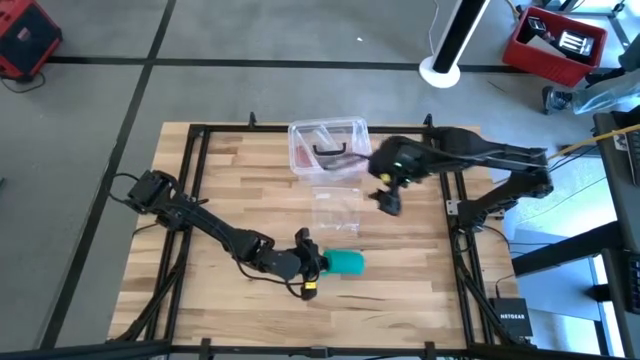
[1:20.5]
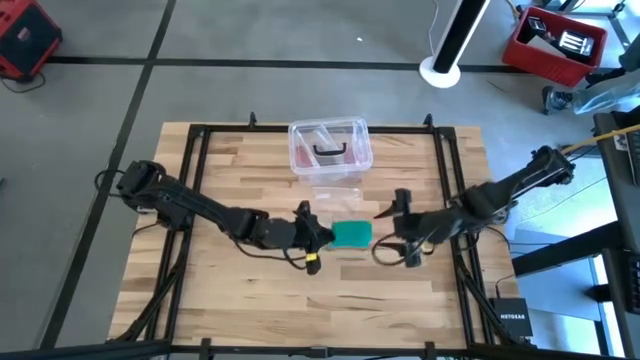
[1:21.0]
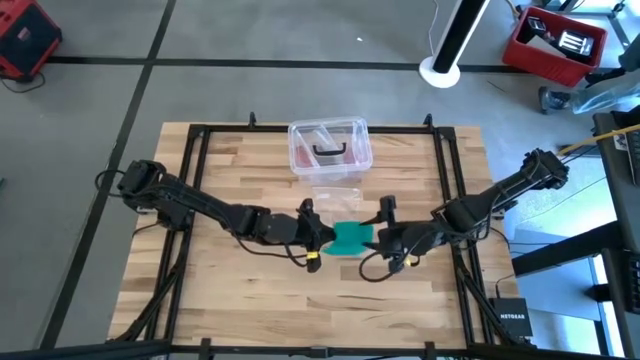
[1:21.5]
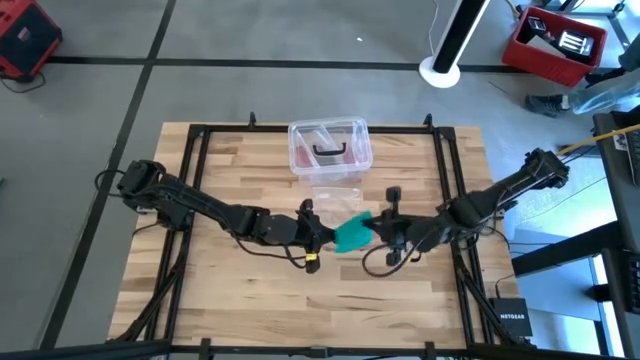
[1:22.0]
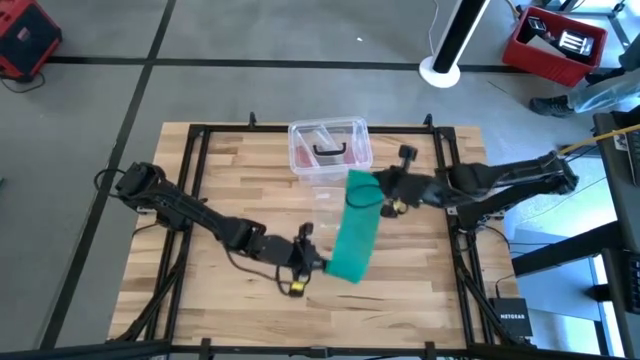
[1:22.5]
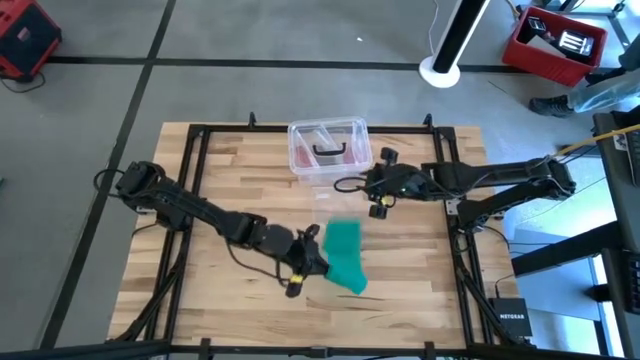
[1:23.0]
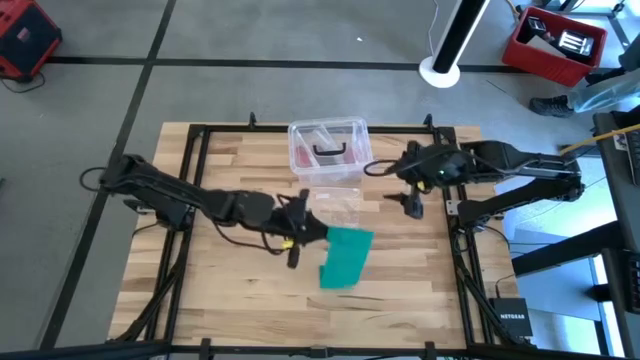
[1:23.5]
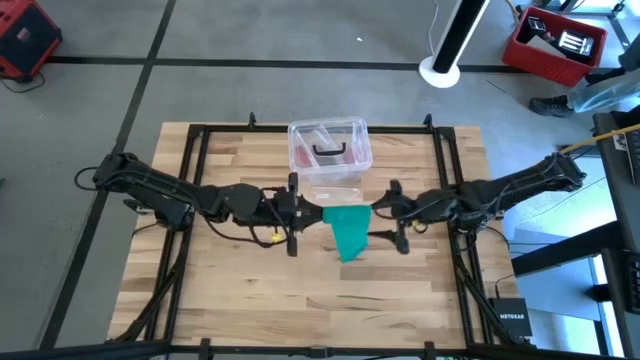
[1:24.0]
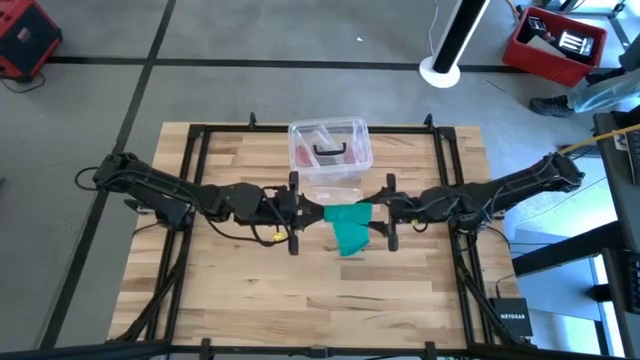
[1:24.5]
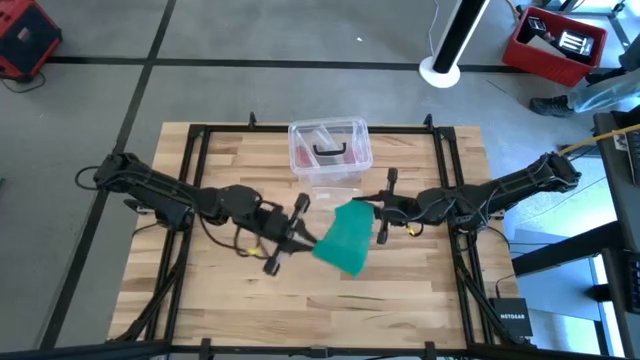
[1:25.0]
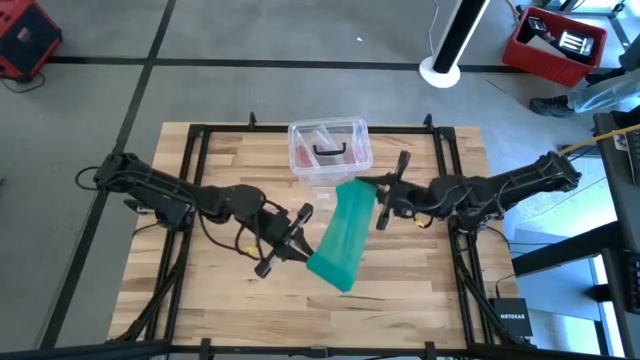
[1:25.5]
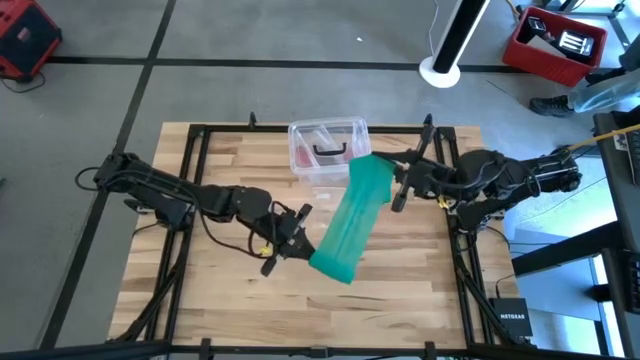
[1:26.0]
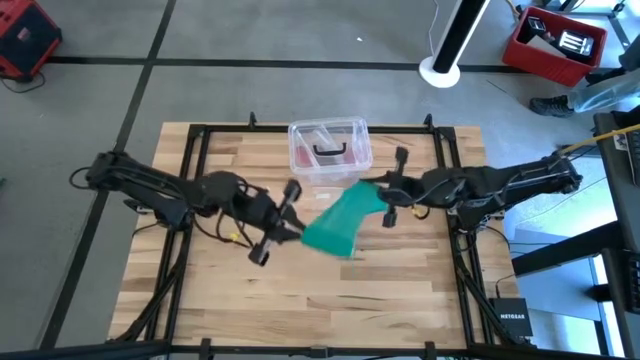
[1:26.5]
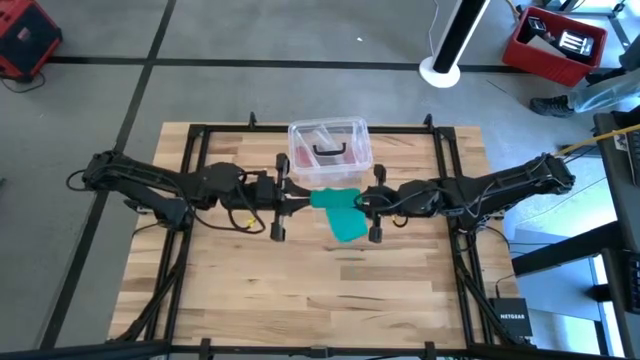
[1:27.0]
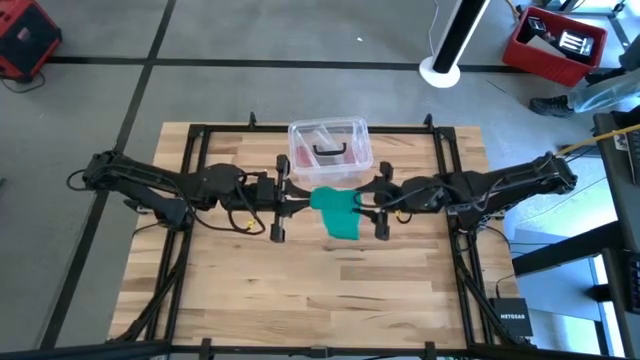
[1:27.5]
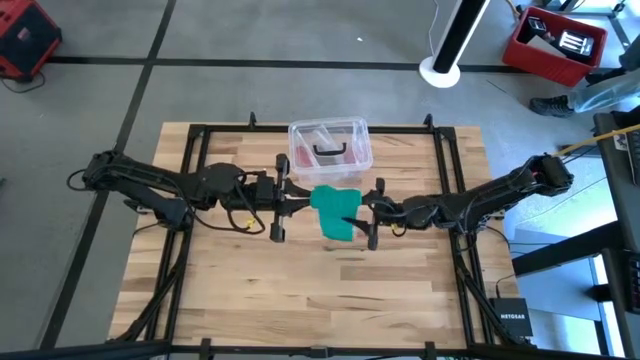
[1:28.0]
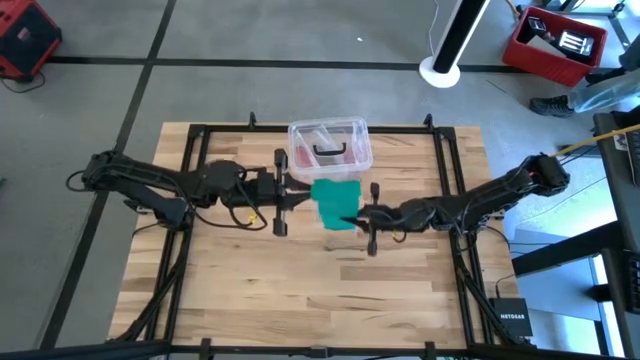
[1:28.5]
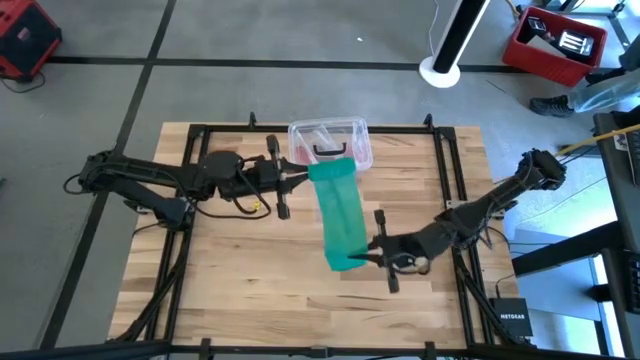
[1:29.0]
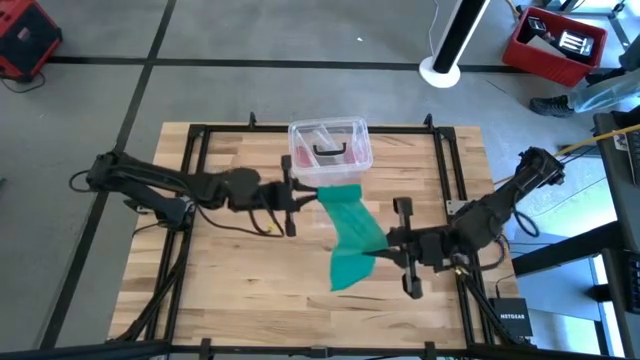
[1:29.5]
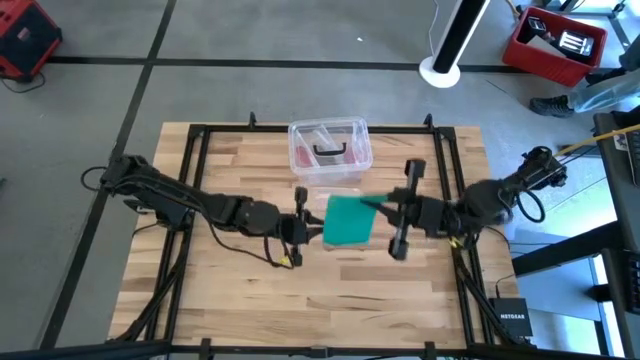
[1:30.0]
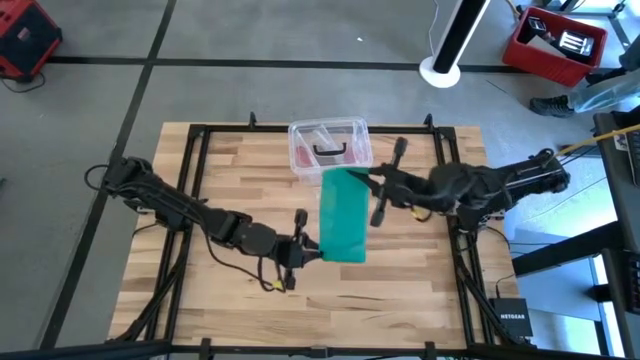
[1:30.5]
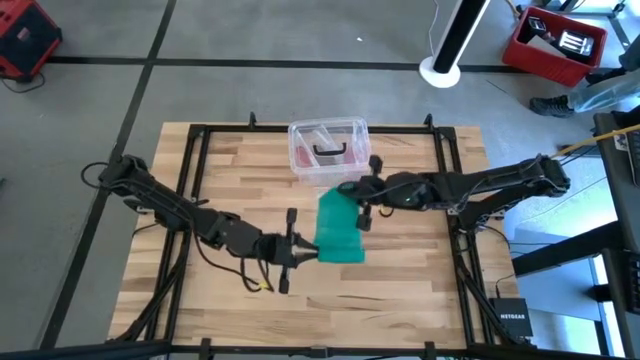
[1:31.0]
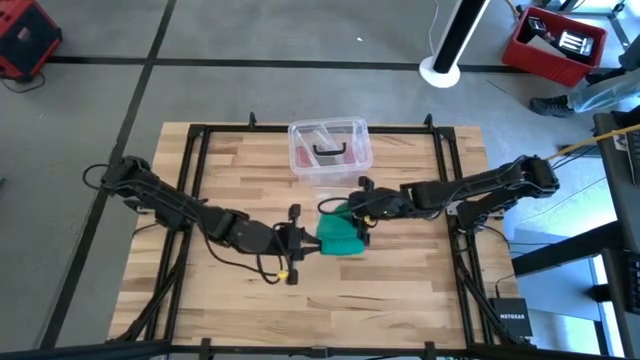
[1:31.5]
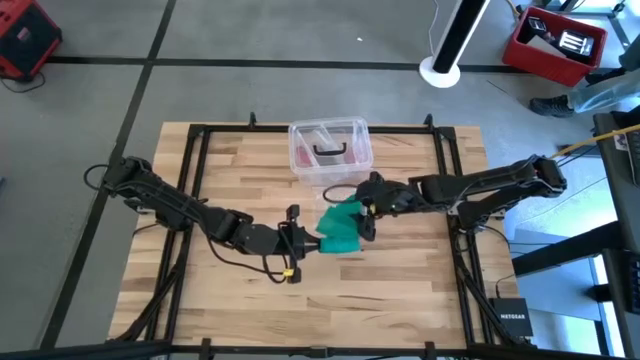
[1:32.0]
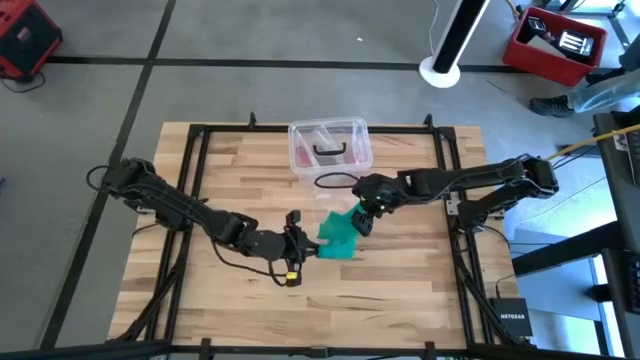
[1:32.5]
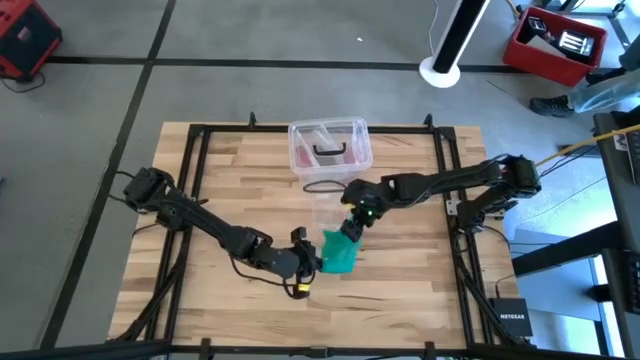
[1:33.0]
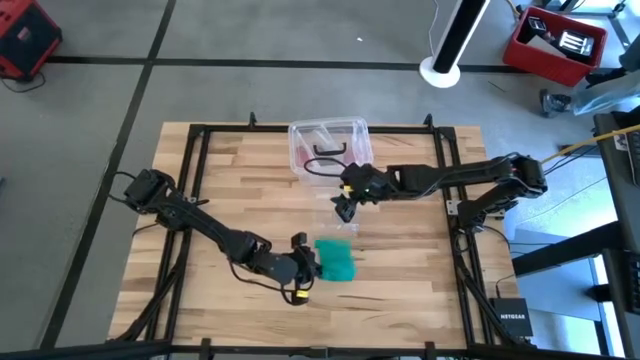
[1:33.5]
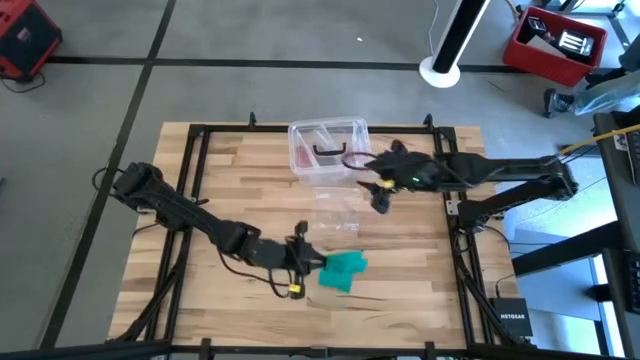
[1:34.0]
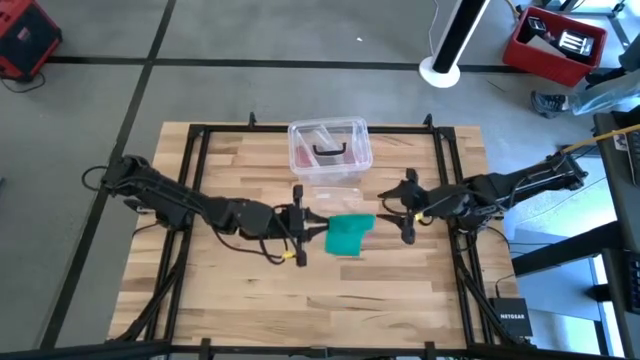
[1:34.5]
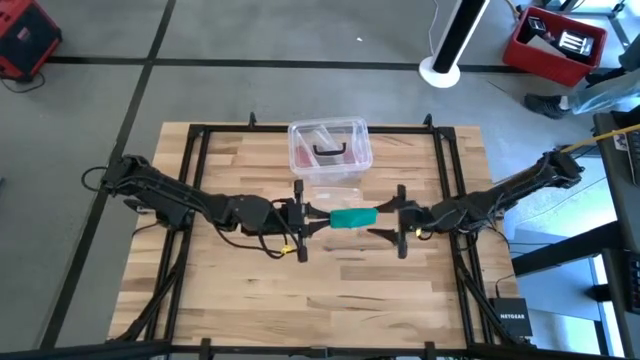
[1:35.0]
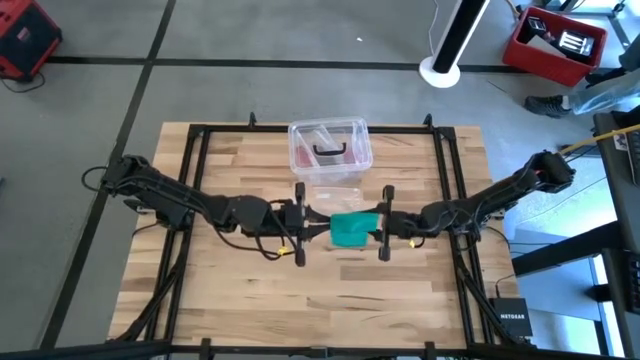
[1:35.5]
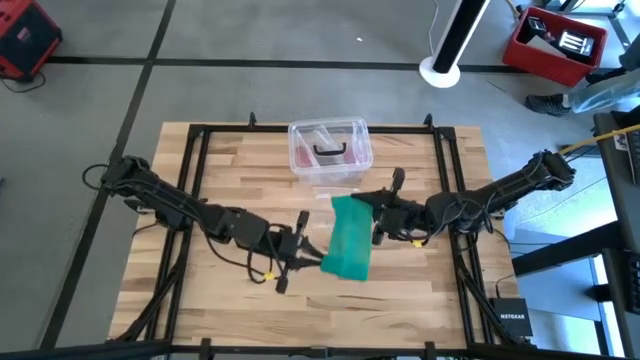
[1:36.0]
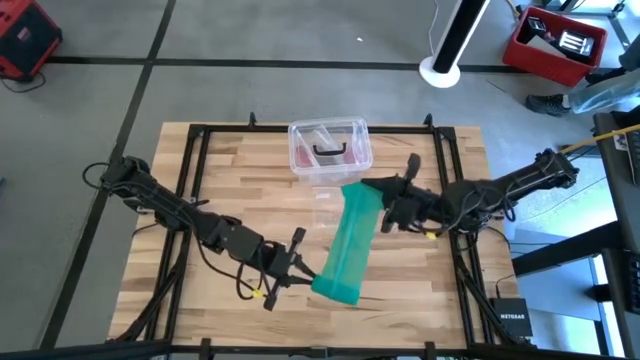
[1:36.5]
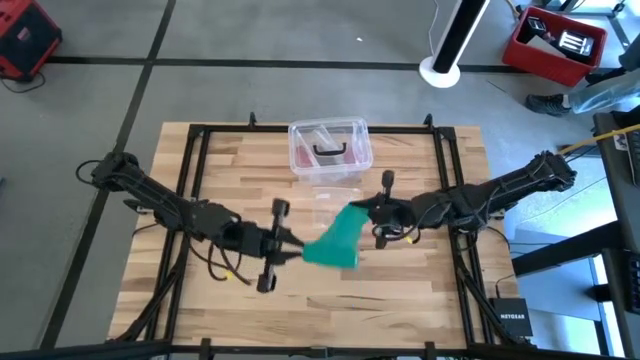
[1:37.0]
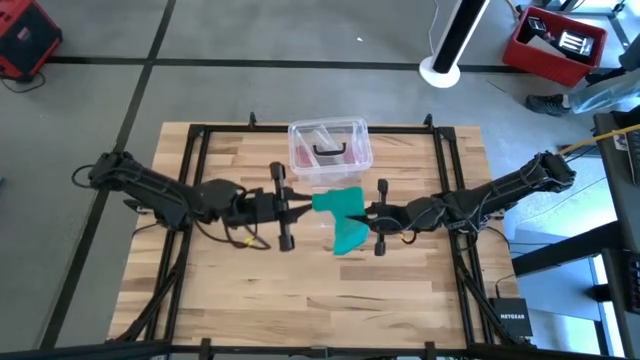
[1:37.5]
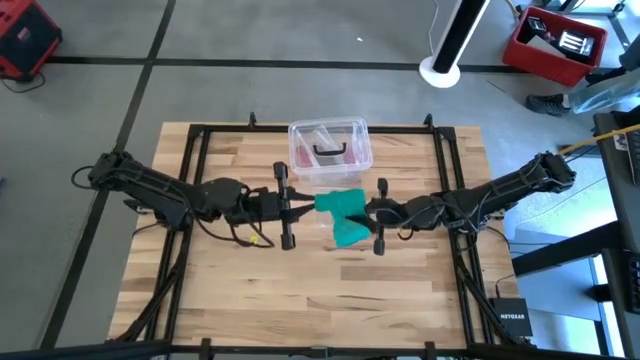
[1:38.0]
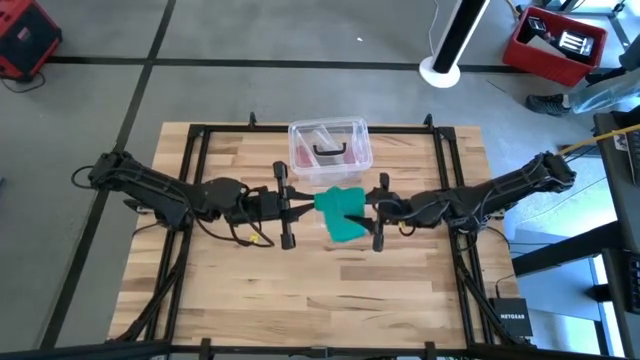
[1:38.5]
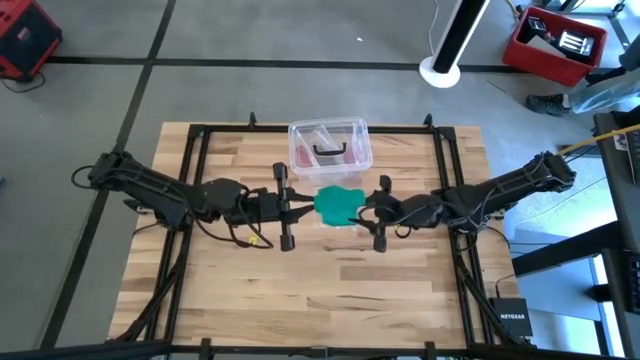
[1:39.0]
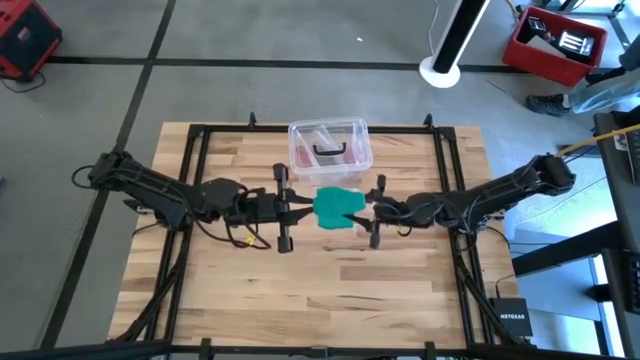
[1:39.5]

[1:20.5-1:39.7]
Task: Roll bandage
Roll the green bandage

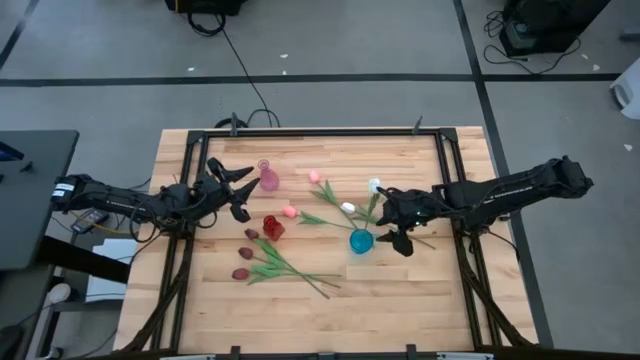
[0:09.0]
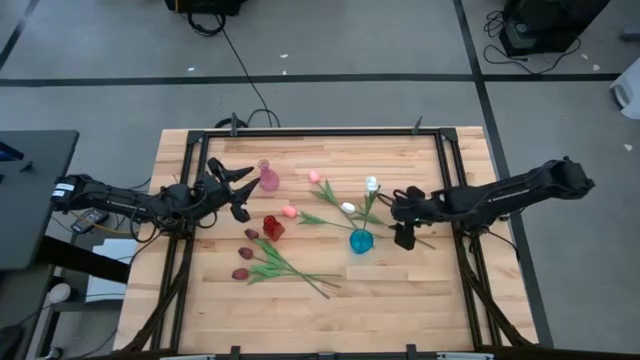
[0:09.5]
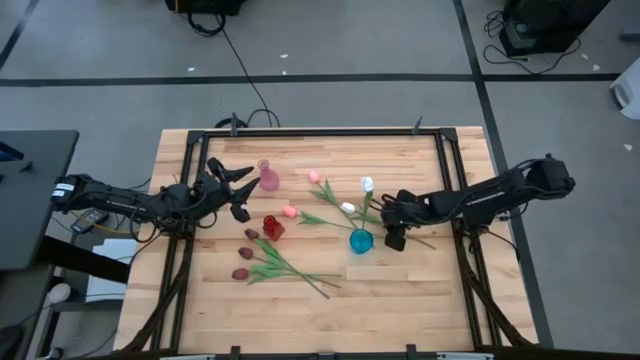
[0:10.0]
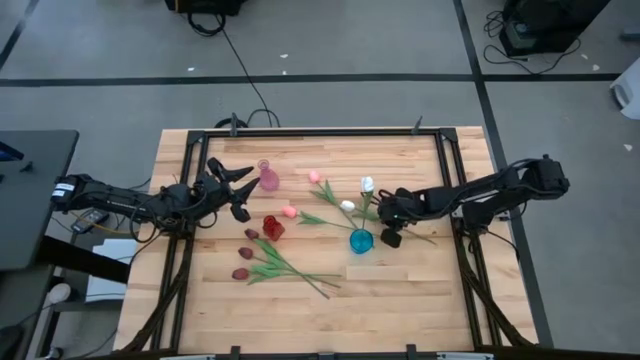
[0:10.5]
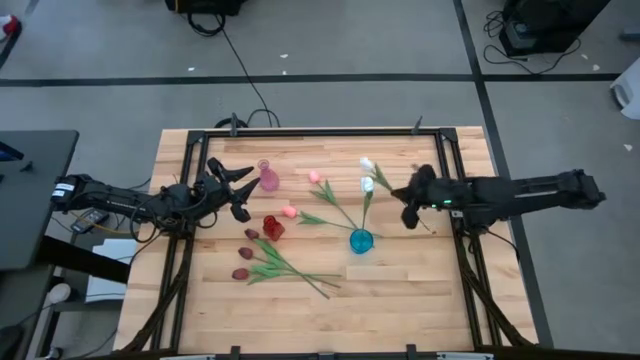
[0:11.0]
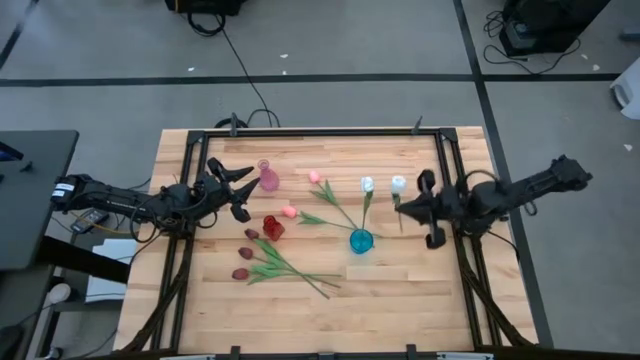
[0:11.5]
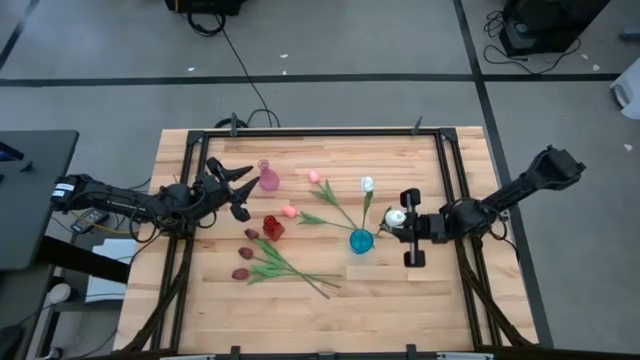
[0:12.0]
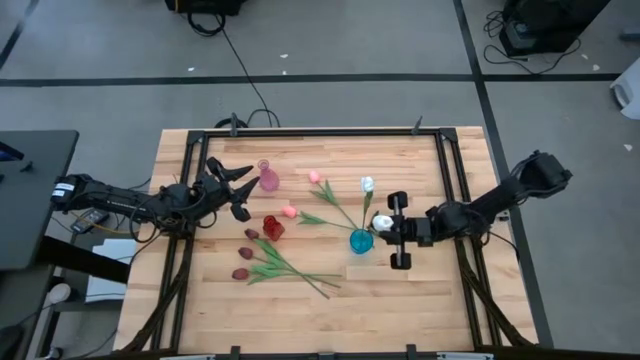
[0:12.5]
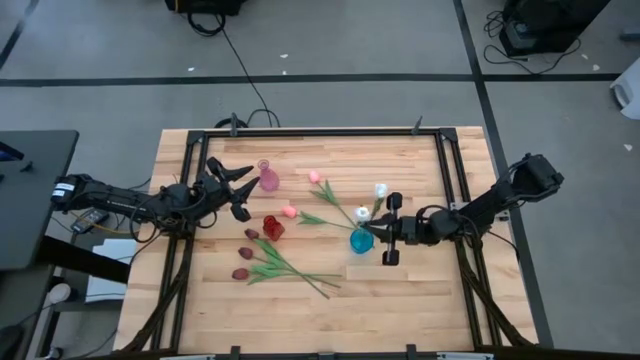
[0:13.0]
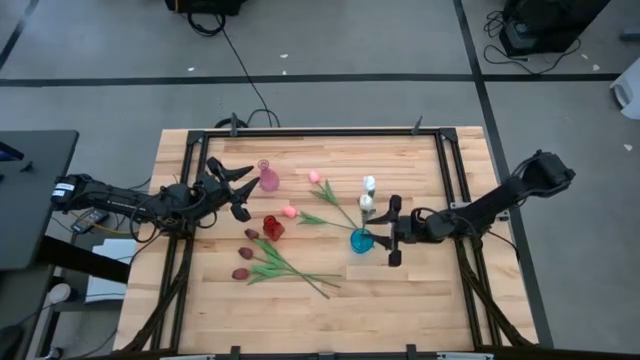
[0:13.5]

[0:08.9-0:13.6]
Task: Sort flowers into vase by color
Put the white tulip into the blue vase
